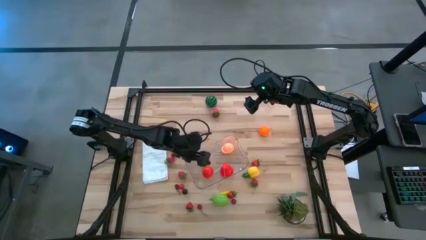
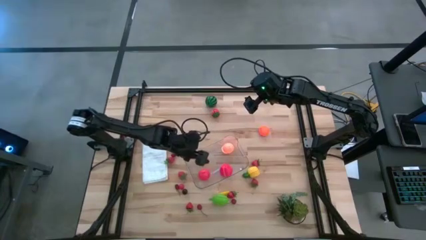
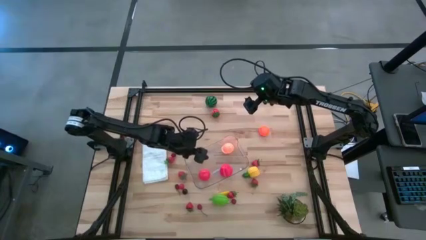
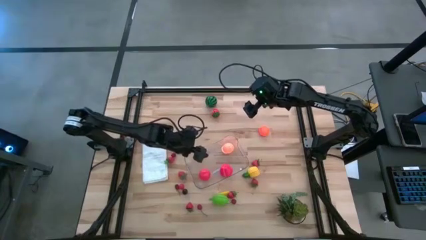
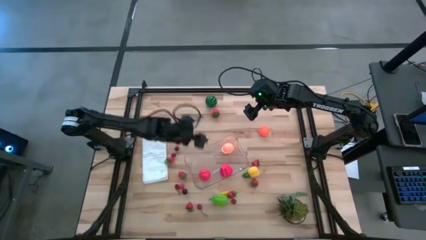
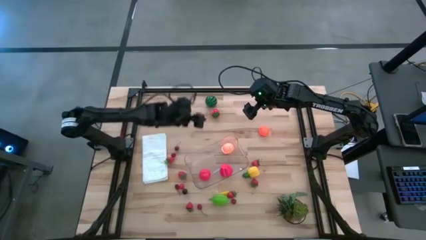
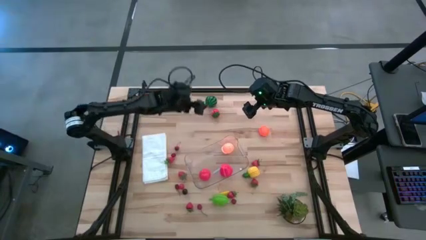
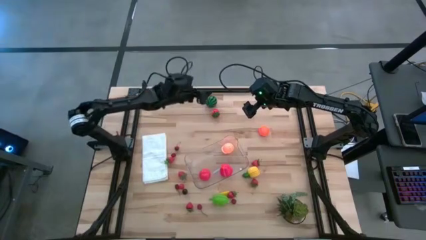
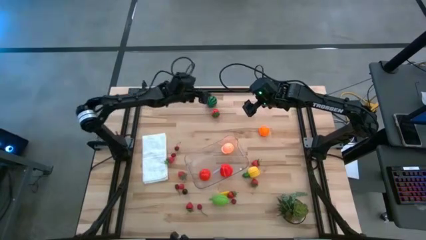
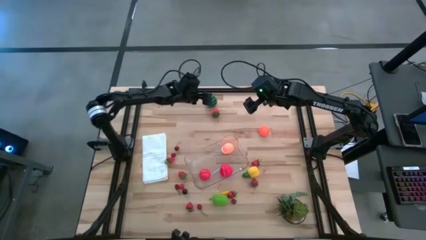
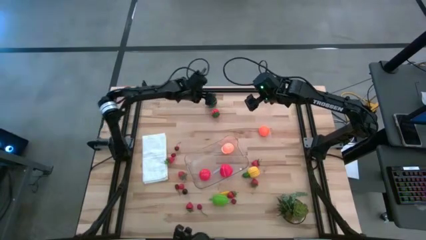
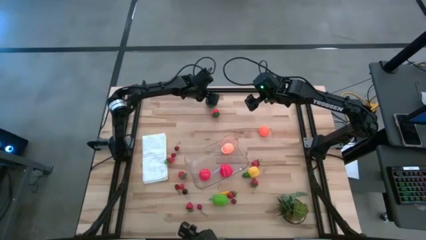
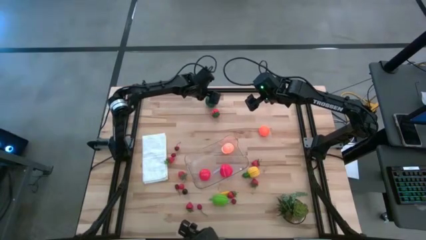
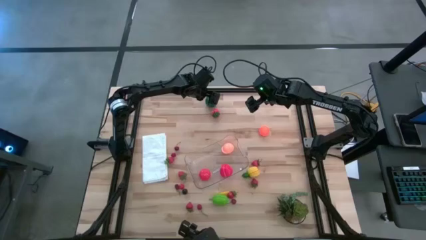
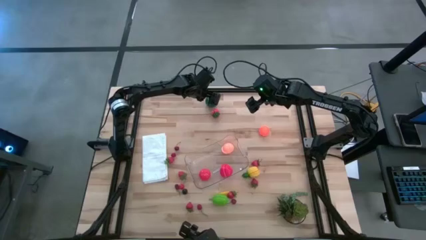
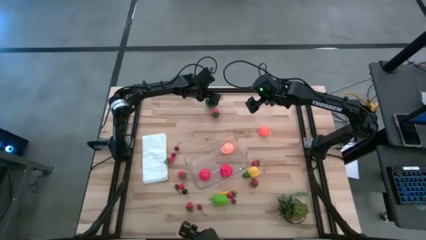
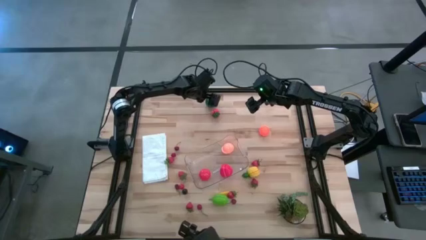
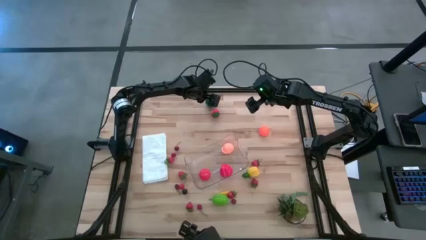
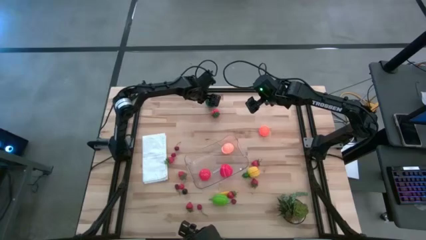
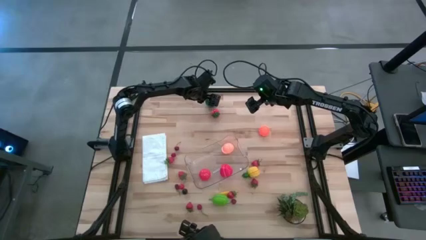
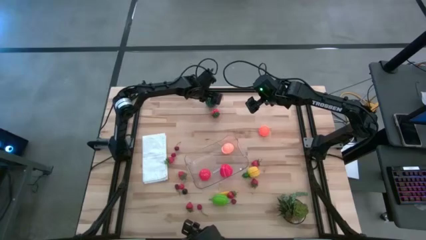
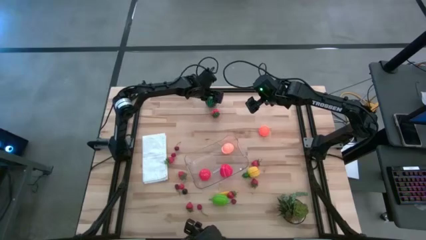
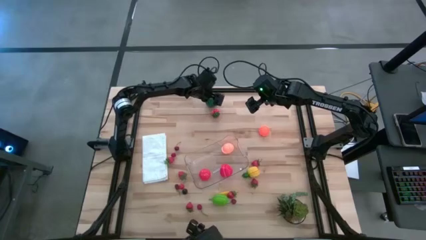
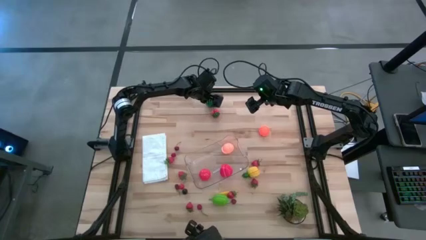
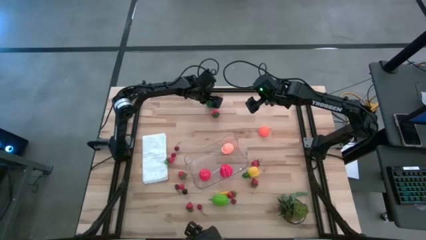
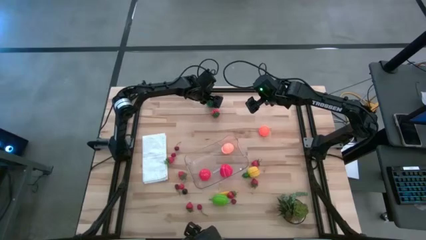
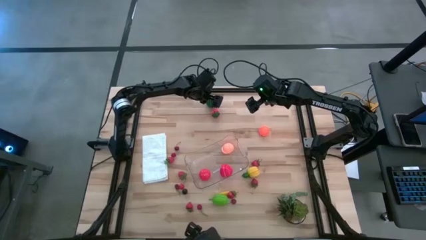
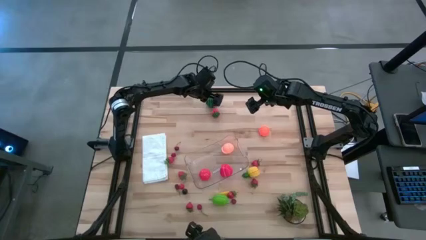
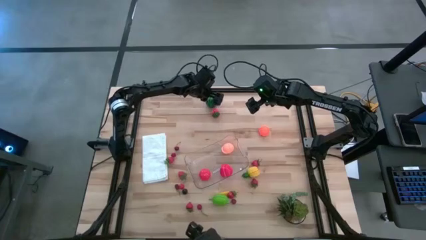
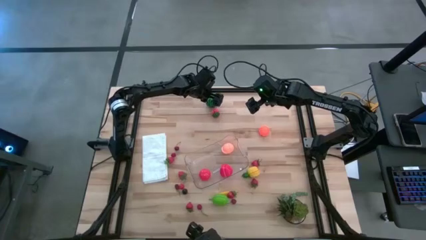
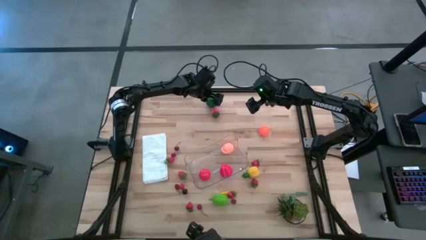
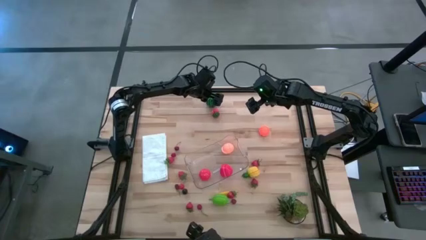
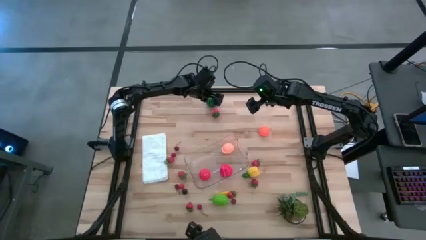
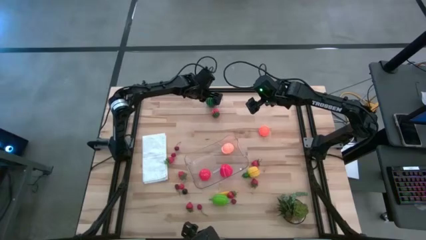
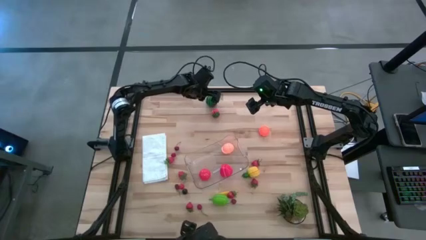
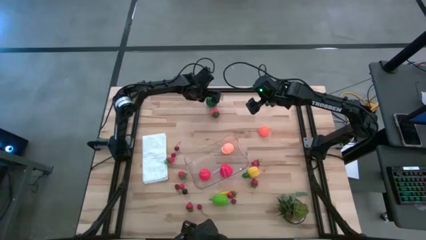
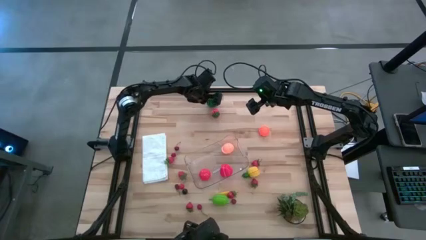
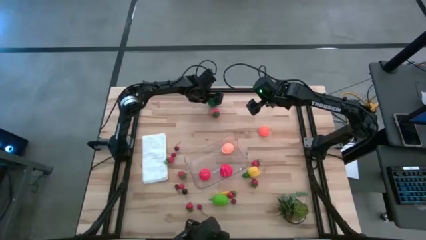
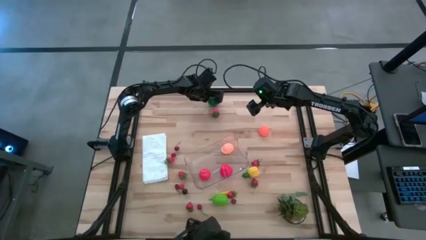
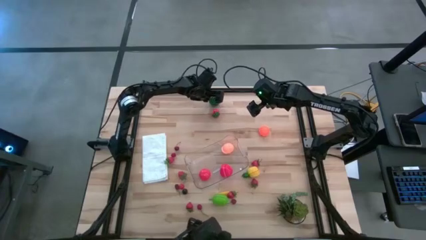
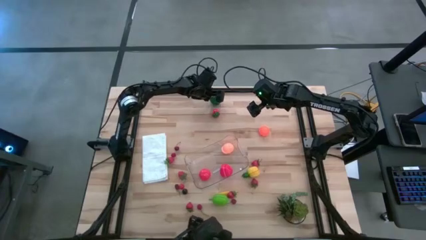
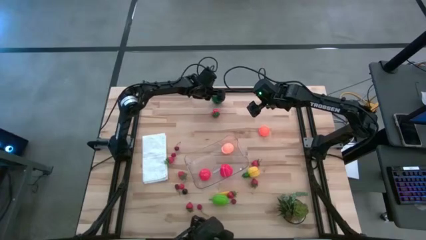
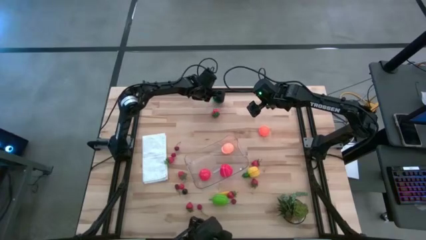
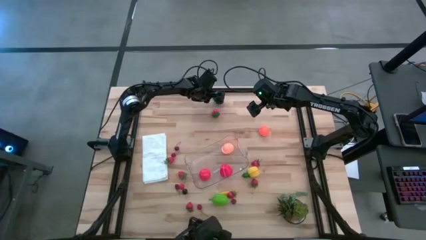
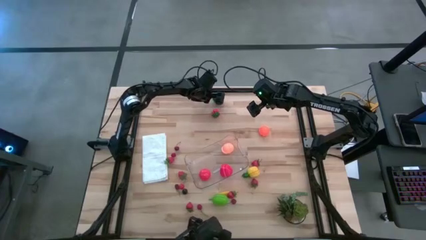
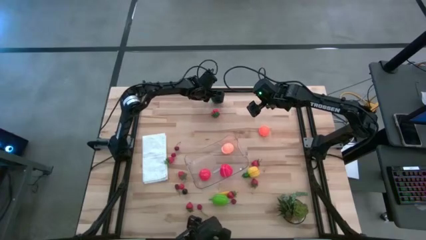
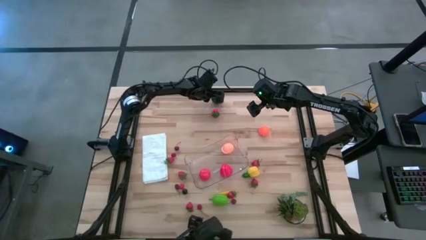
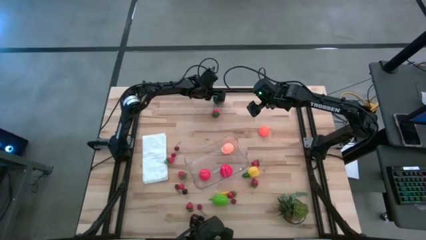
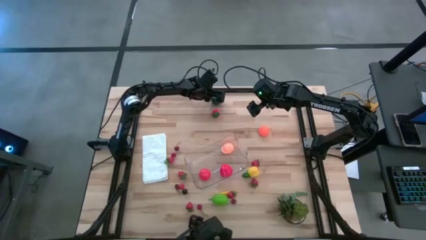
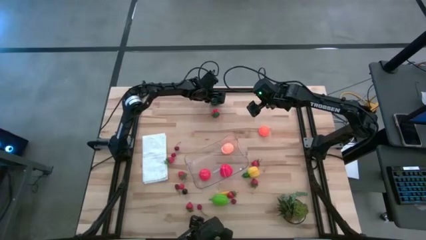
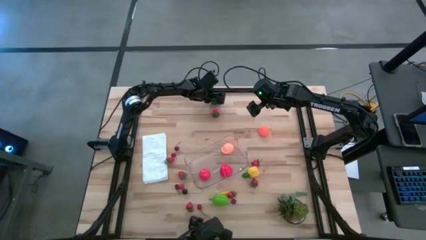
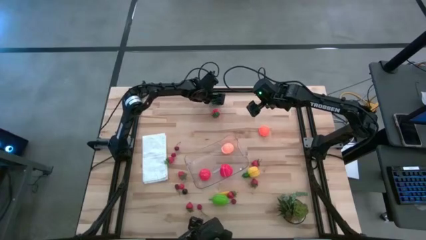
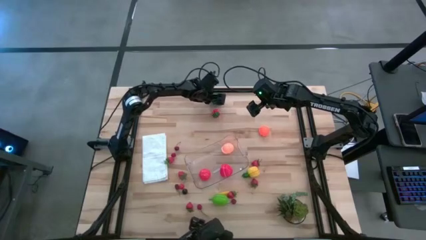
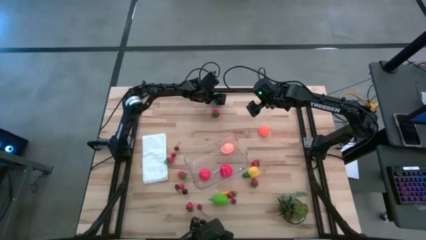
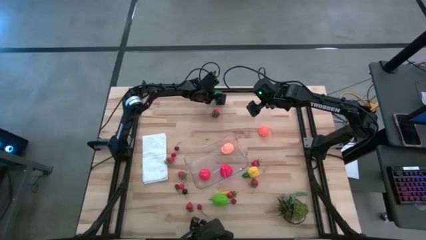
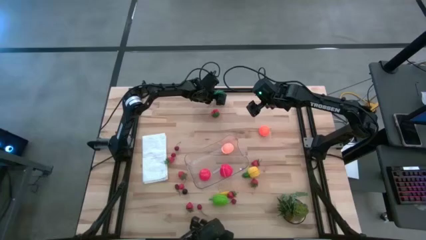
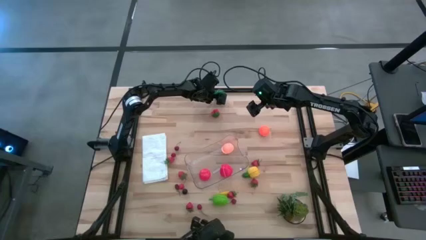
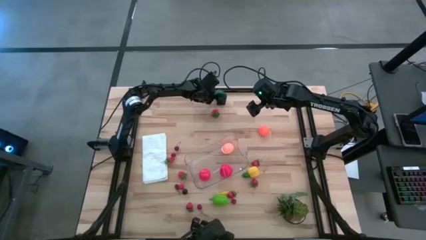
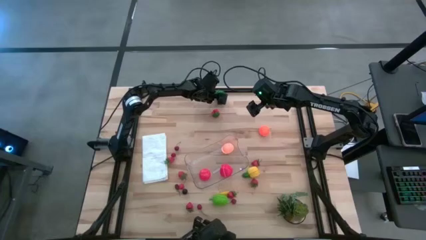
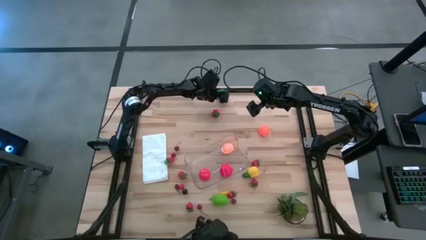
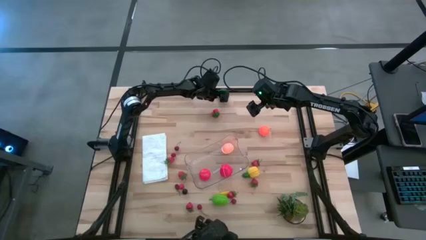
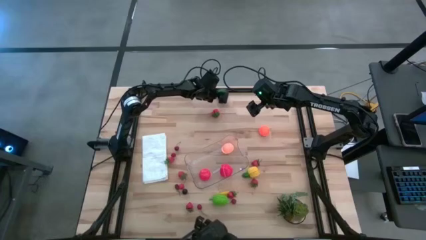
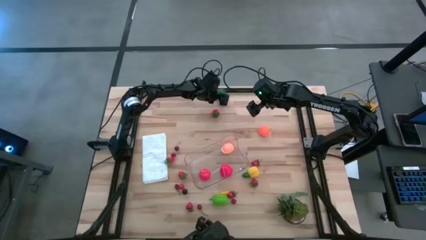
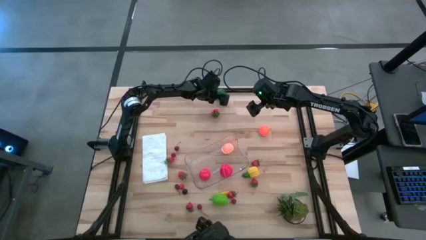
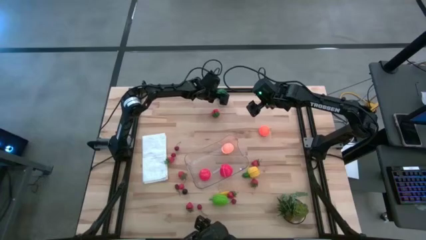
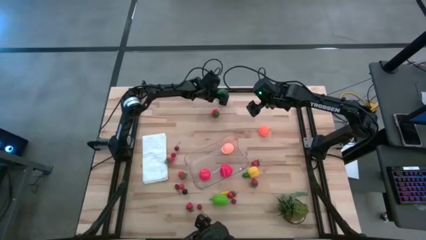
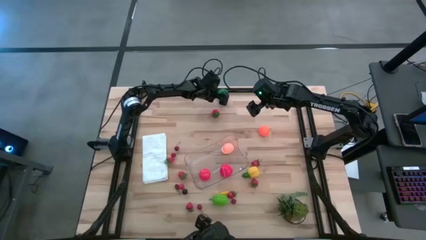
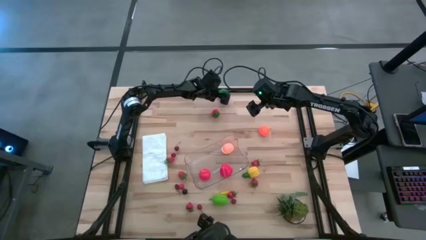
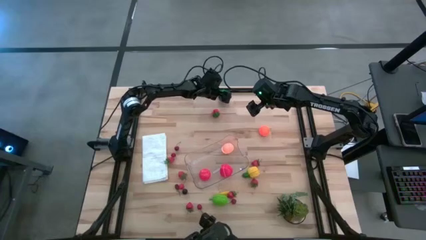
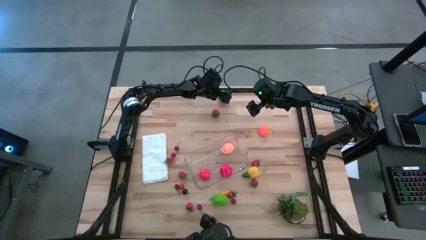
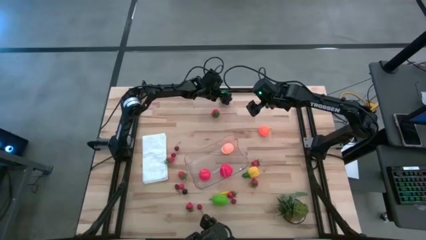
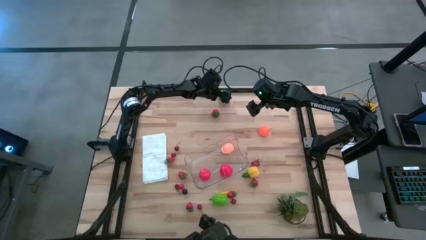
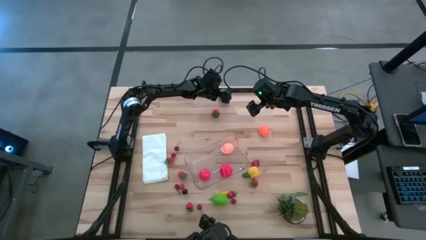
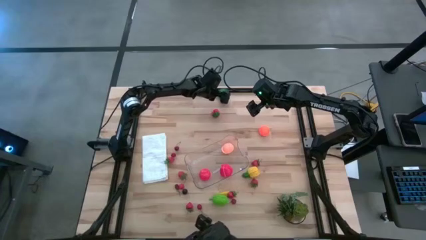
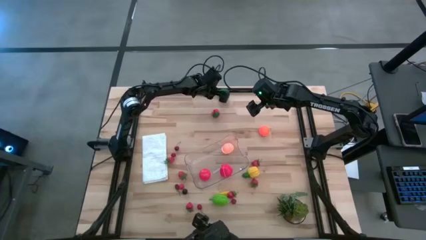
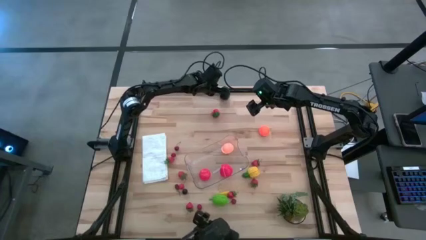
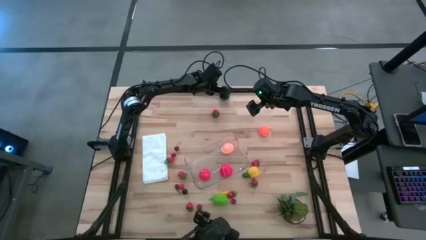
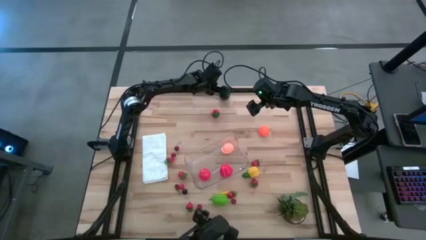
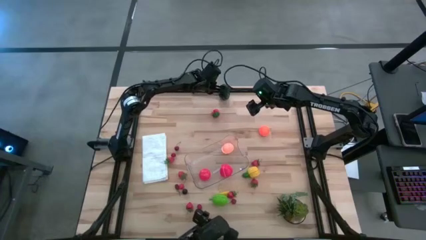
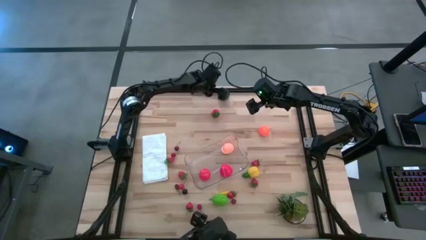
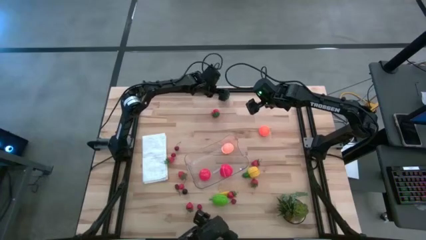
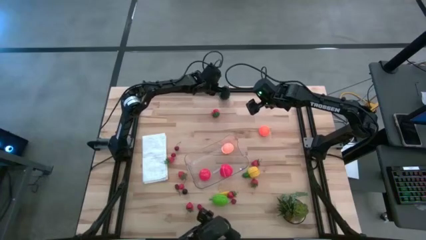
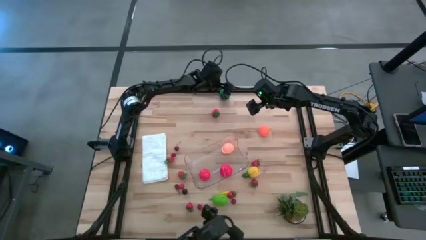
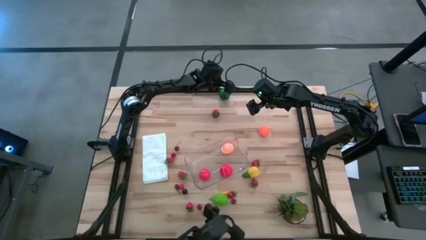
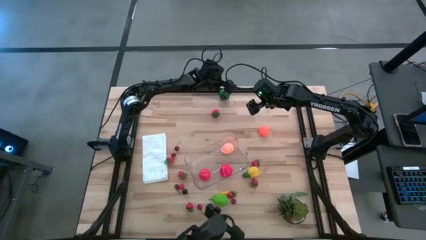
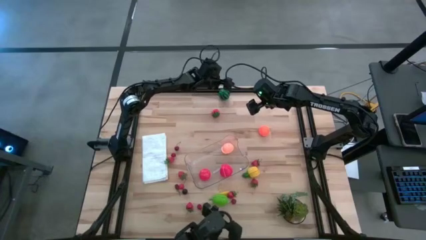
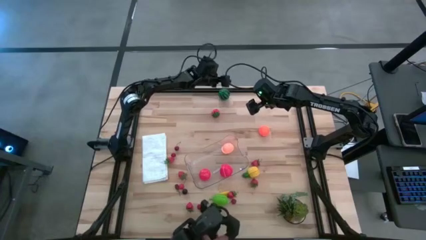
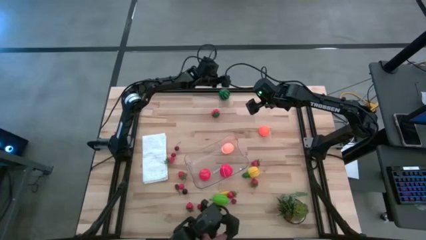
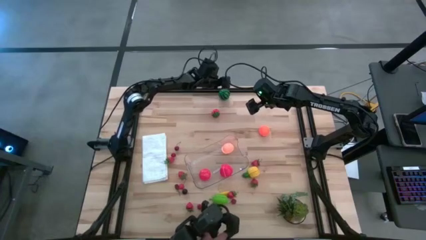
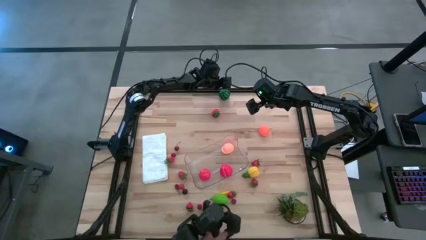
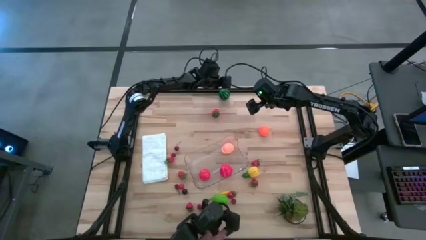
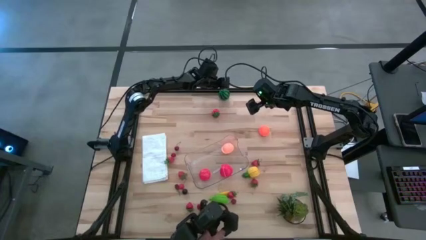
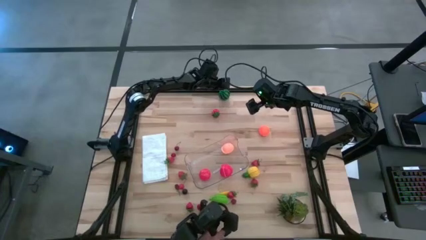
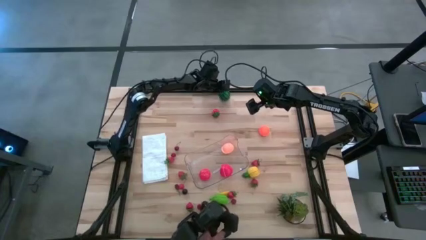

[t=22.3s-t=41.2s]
Task: Pick and placing Produce into tupperware
Put the watermelon into the transparent bin
